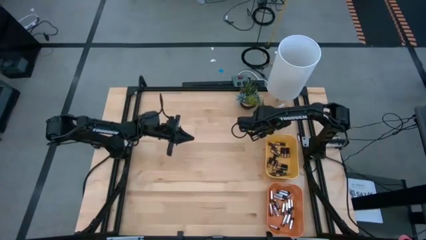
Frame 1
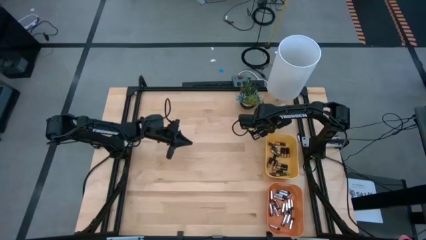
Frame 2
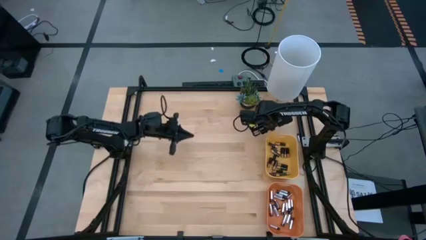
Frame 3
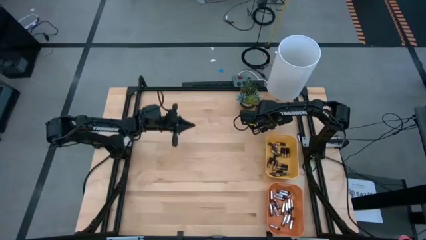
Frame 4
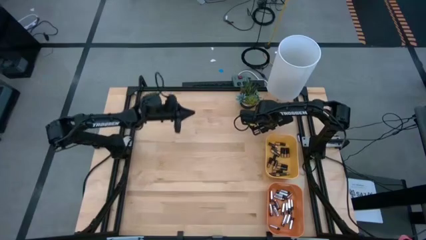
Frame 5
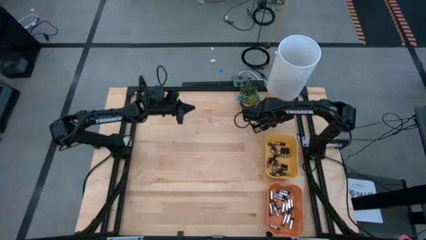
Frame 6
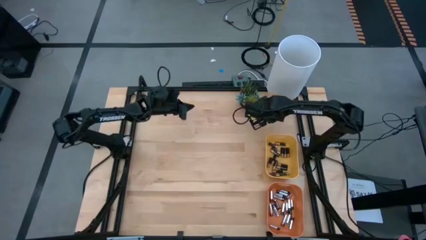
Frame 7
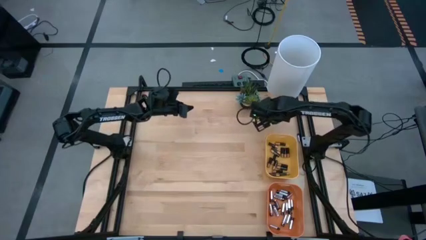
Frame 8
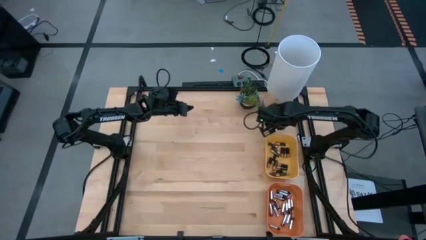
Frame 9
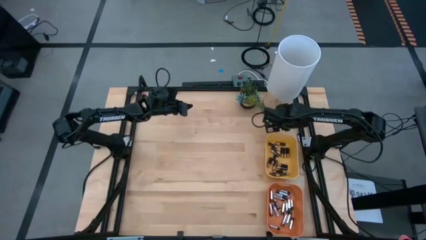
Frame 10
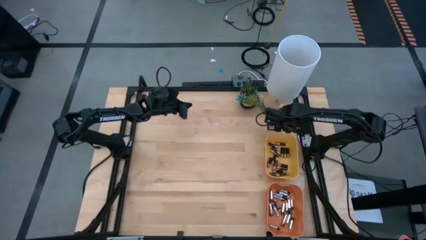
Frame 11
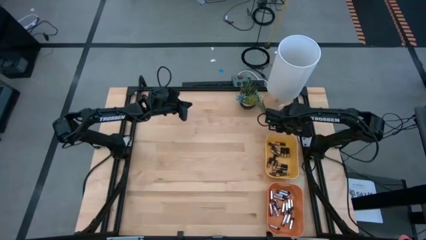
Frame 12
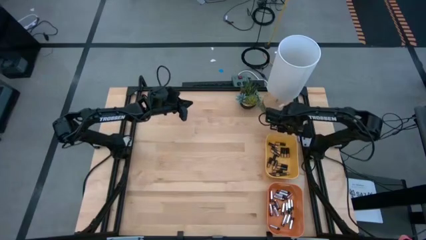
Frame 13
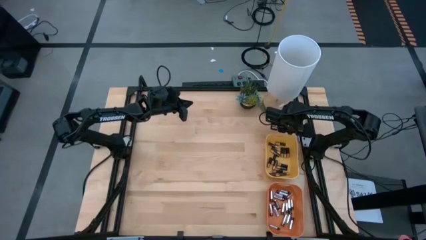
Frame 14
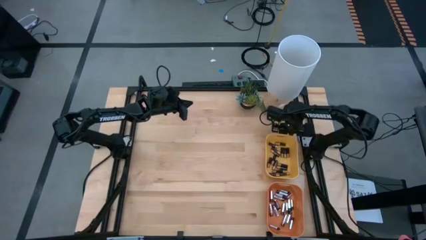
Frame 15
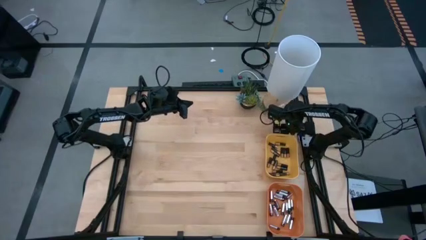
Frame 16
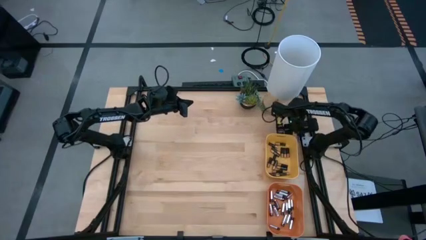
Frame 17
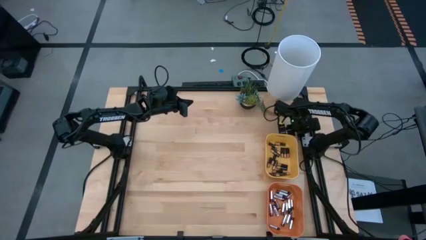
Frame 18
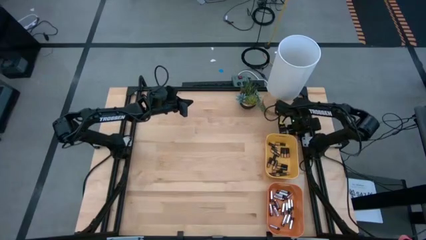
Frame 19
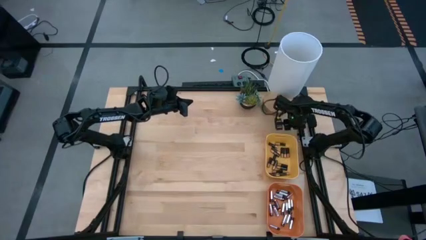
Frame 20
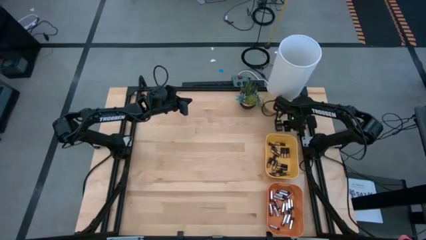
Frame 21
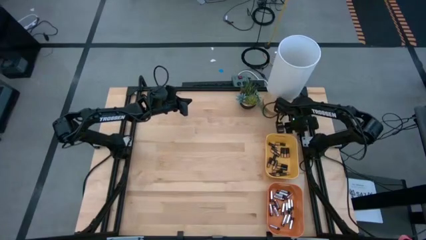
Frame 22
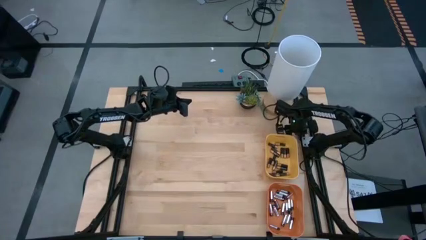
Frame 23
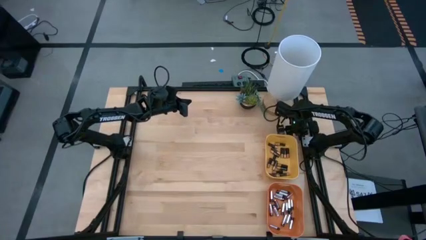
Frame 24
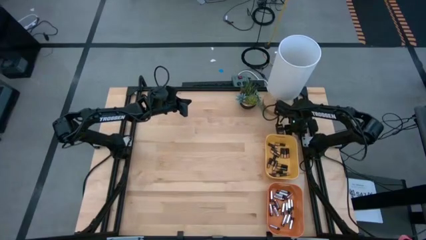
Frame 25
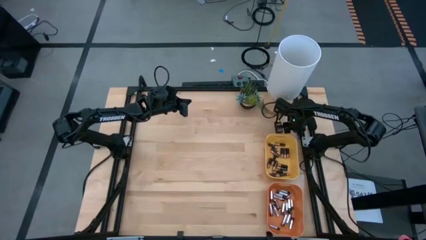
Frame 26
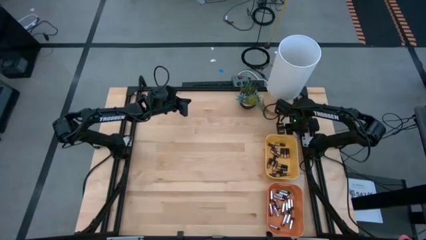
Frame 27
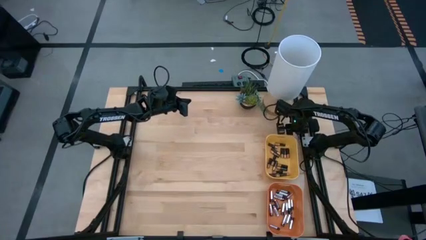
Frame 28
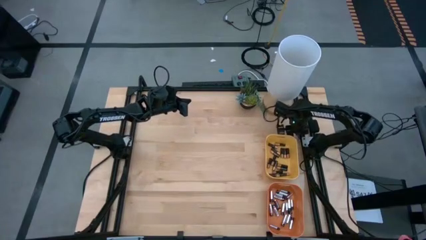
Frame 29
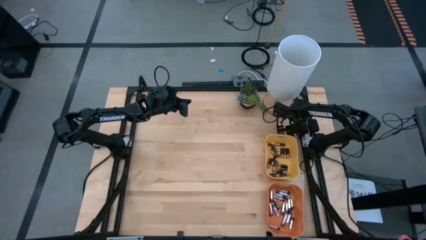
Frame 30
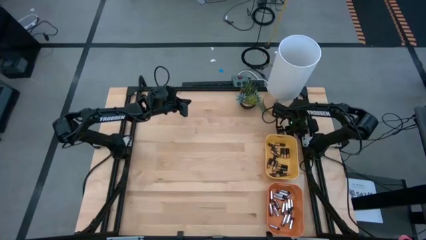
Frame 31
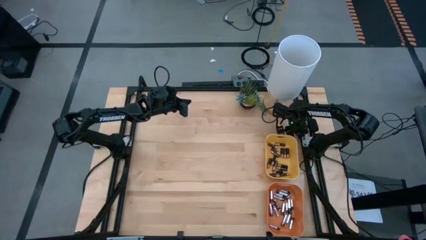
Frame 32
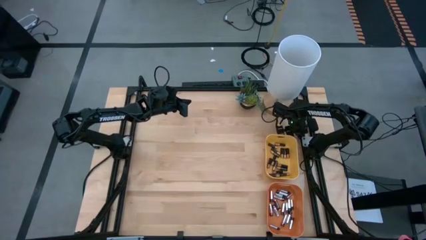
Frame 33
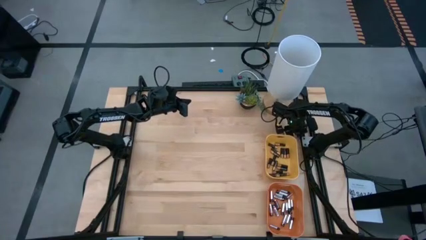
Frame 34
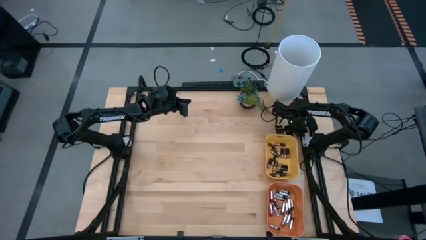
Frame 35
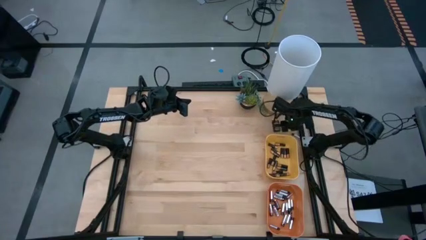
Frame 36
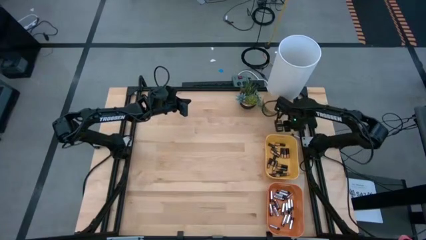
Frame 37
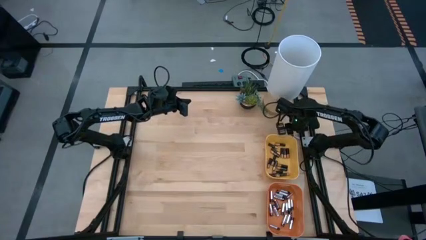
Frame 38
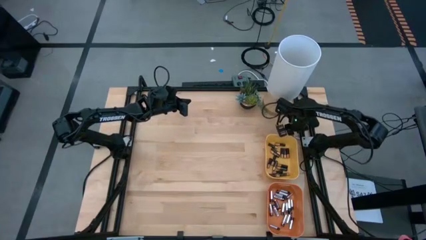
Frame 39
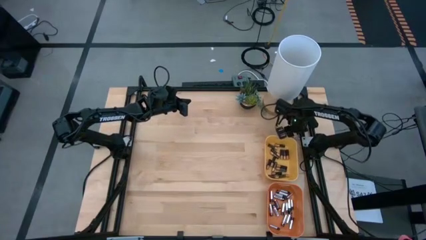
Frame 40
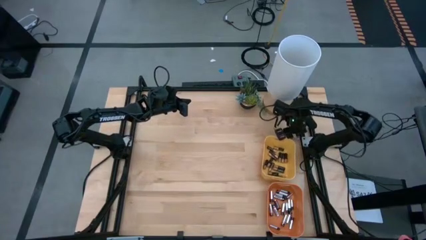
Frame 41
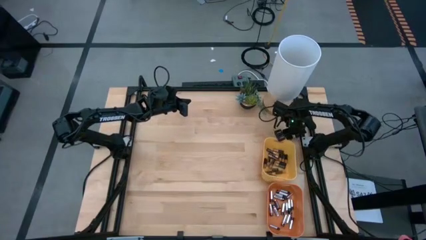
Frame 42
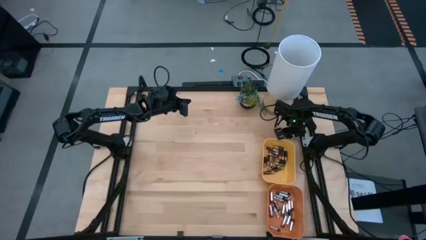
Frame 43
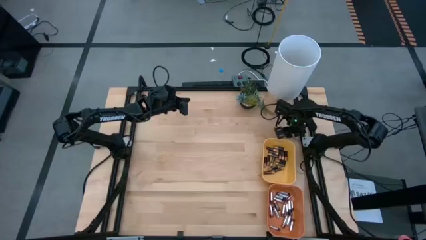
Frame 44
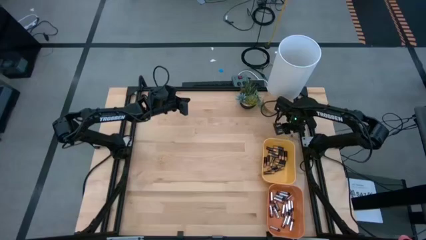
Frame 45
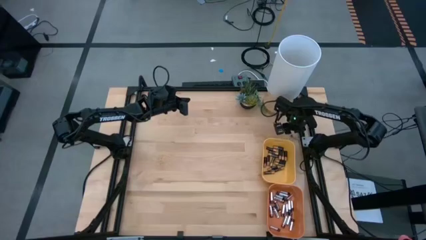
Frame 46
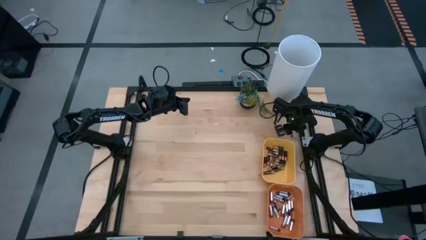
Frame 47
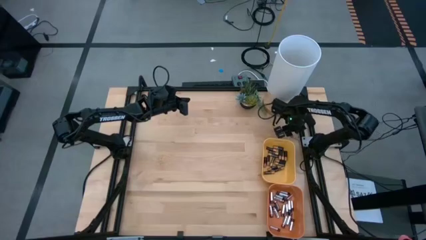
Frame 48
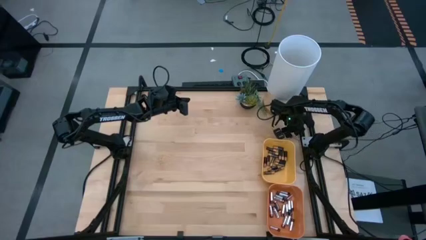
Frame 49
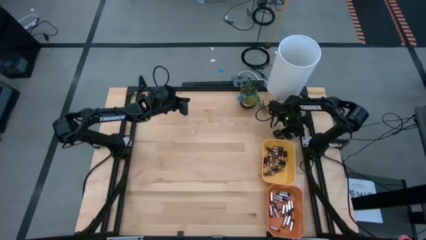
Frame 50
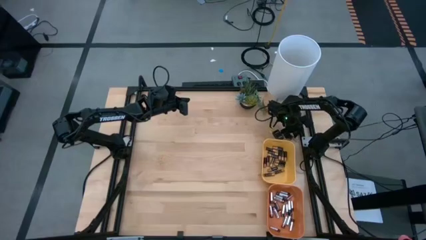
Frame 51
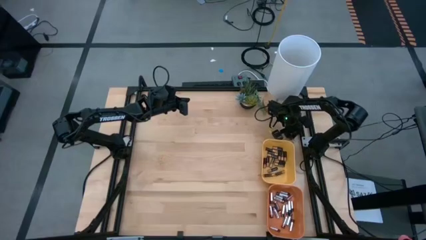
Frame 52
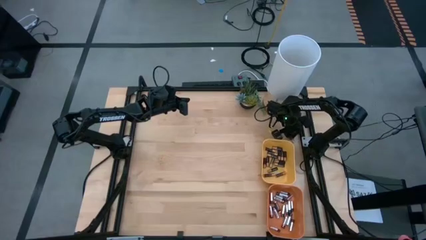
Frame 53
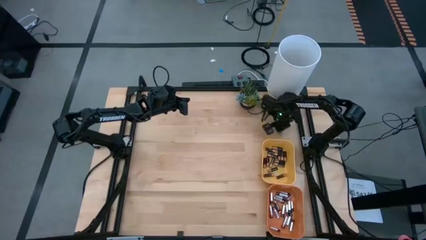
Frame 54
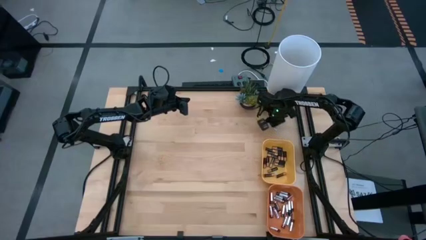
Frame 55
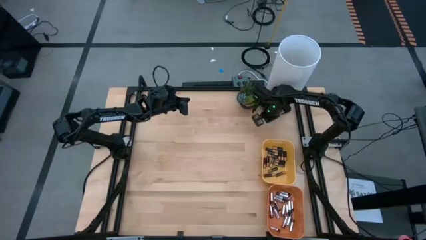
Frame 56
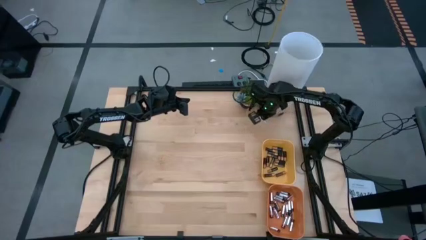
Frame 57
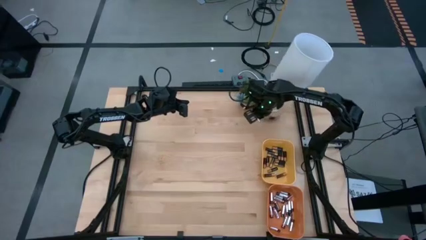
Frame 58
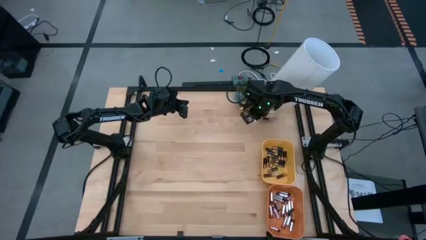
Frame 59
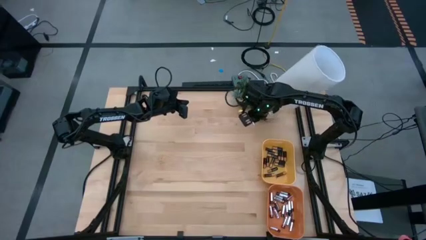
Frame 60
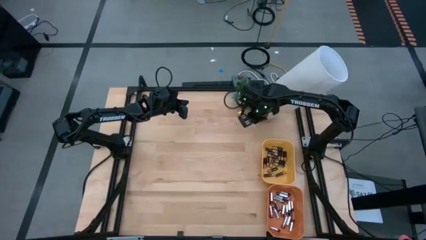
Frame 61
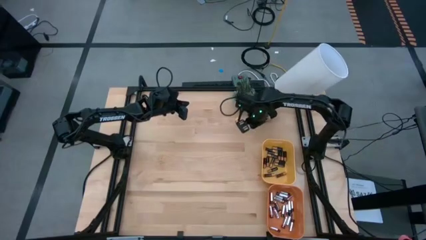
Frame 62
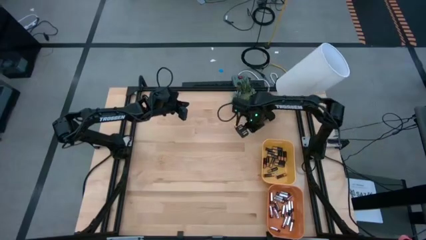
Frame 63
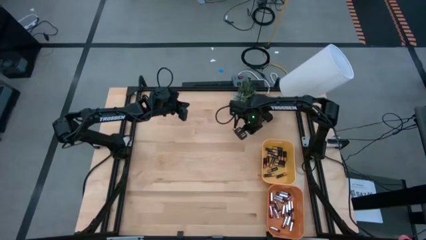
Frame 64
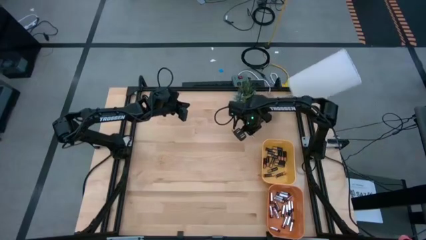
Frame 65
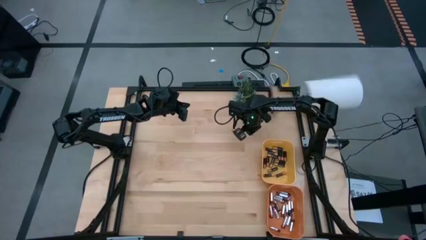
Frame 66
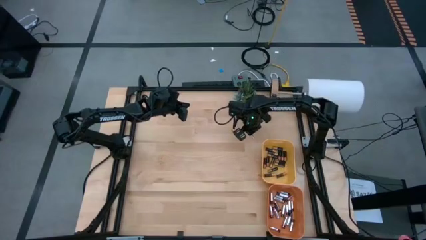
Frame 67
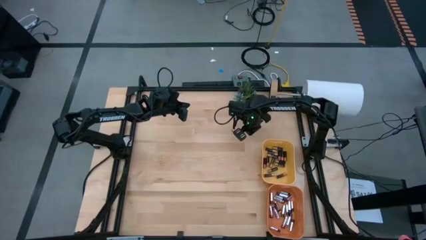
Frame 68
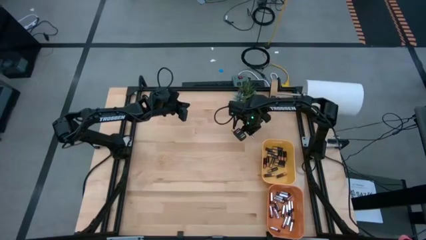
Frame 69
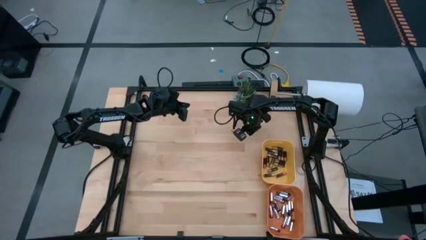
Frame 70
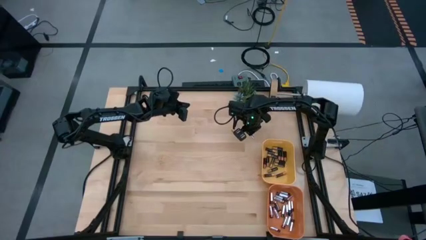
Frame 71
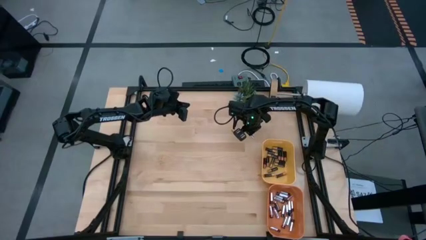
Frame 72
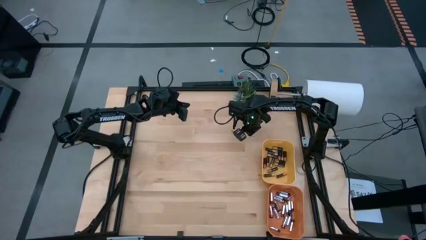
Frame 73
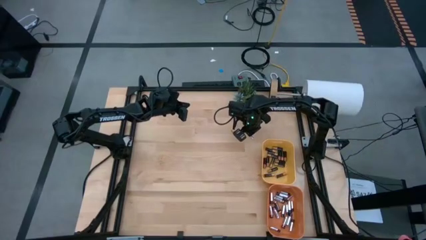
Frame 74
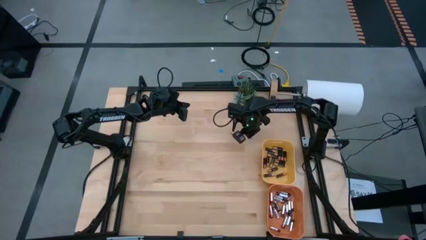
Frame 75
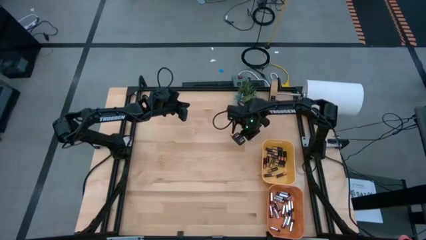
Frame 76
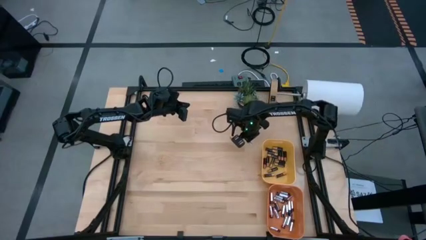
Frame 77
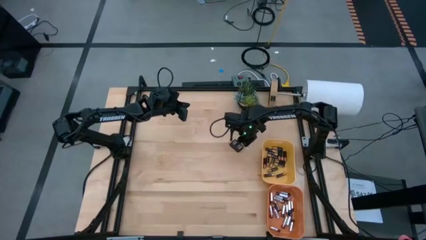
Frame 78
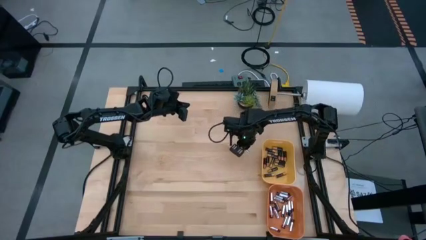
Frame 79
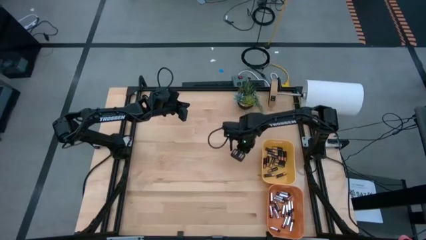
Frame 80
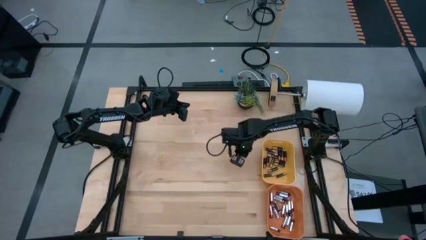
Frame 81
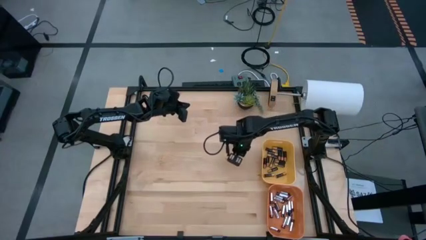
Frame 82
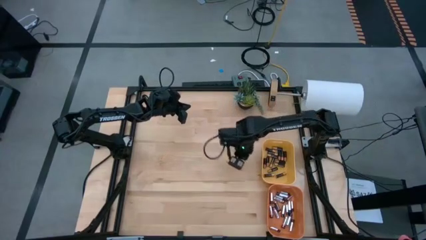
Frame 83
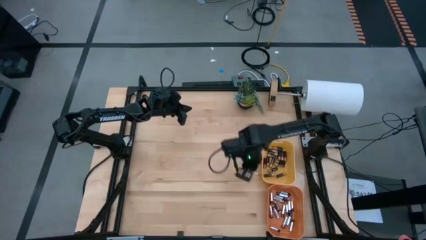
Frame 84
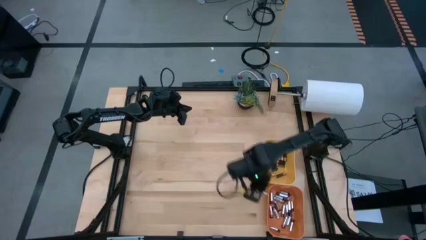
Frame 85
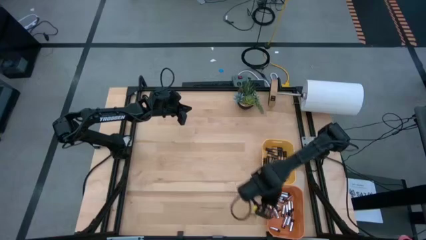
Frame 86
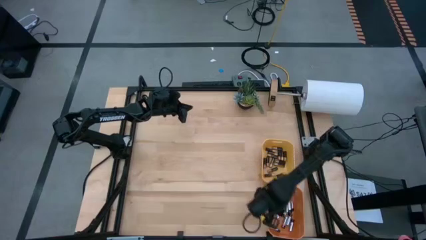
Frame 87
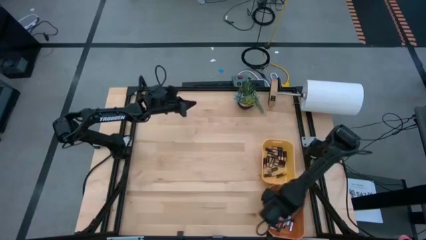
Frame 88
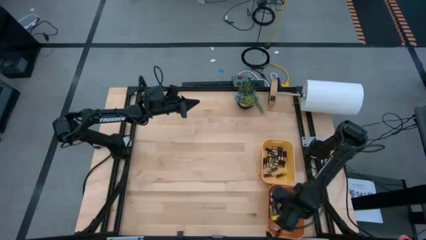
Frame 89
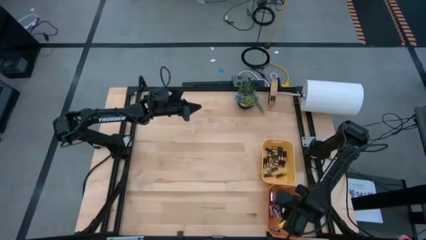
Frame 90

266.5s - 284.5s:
Task: Sort batteries
Put the black battery into the orange bin
